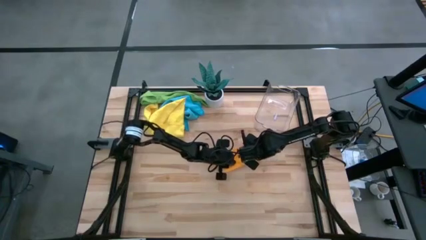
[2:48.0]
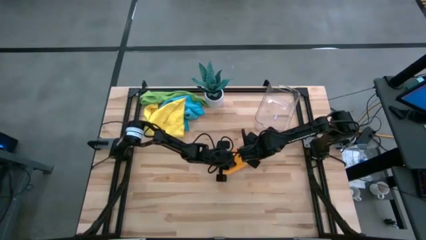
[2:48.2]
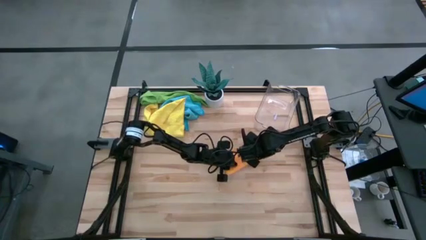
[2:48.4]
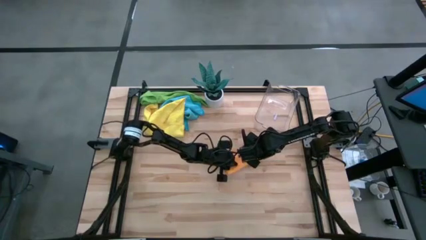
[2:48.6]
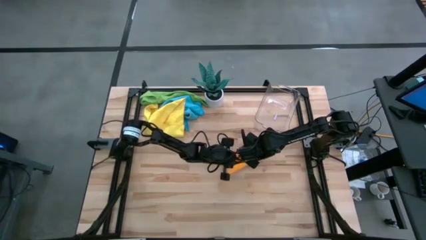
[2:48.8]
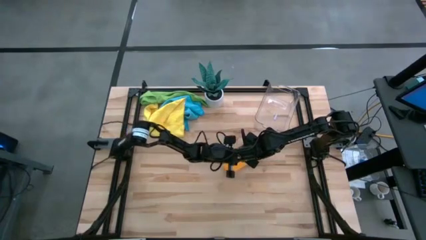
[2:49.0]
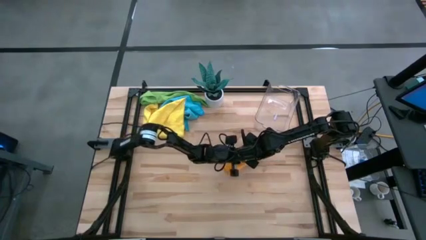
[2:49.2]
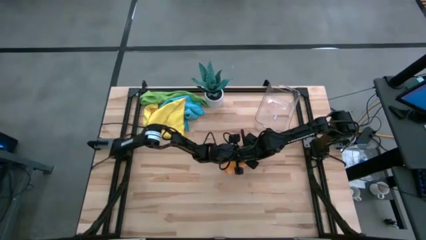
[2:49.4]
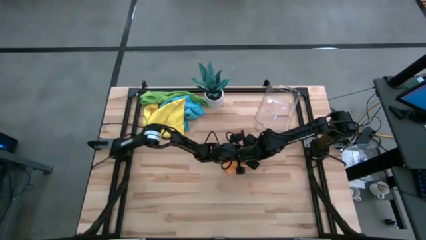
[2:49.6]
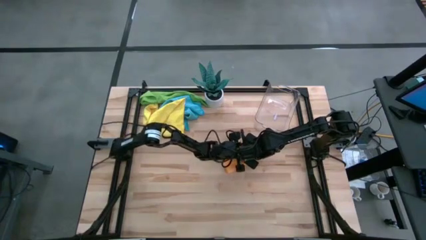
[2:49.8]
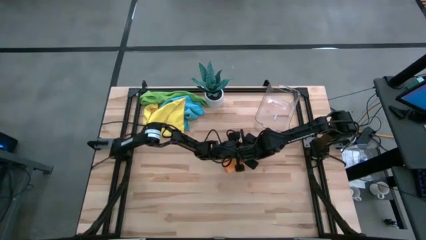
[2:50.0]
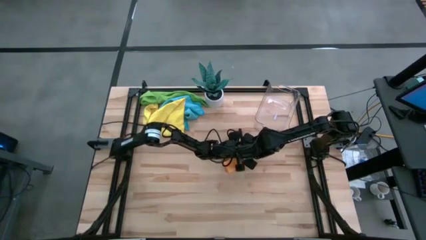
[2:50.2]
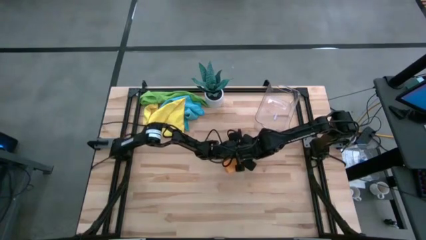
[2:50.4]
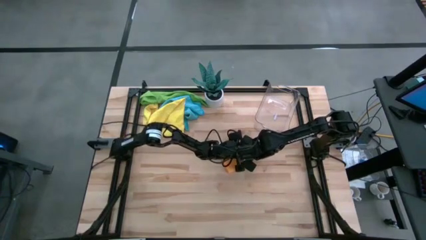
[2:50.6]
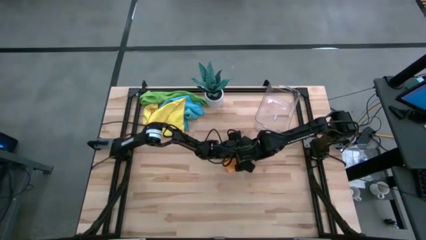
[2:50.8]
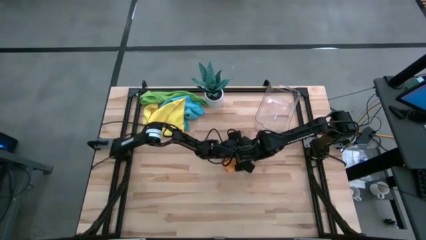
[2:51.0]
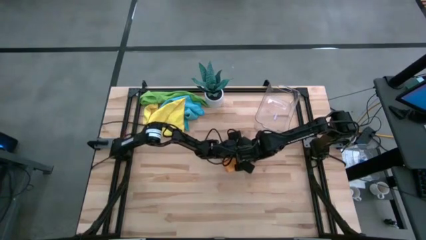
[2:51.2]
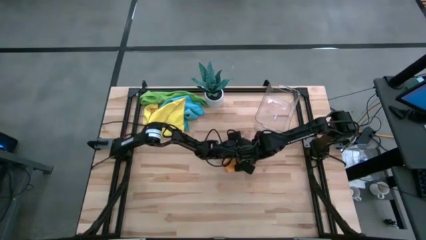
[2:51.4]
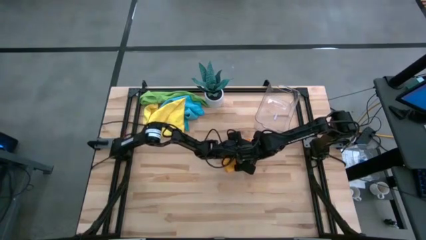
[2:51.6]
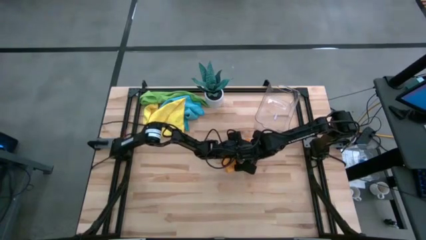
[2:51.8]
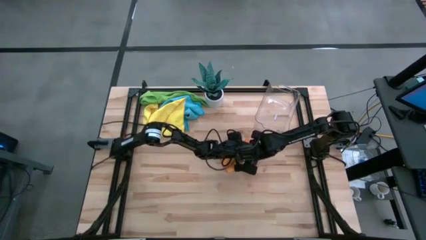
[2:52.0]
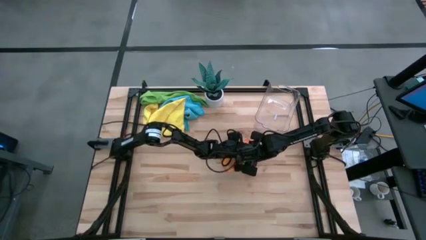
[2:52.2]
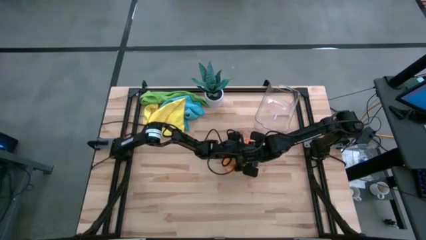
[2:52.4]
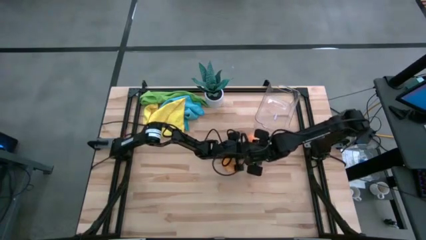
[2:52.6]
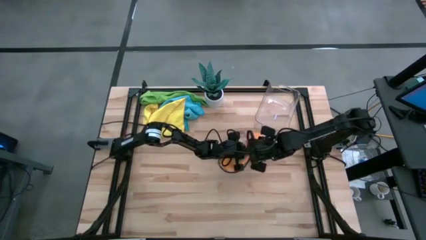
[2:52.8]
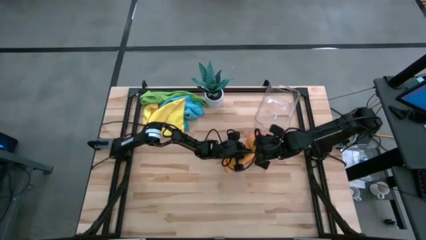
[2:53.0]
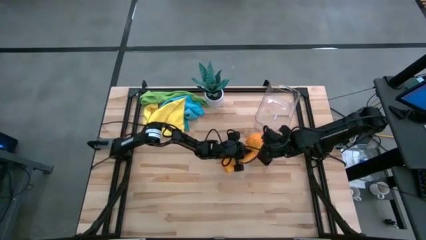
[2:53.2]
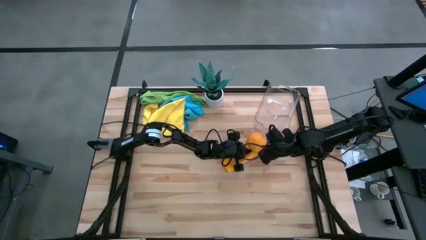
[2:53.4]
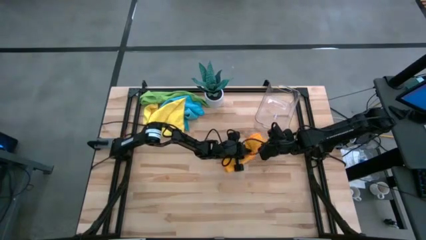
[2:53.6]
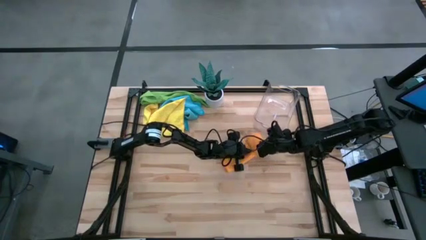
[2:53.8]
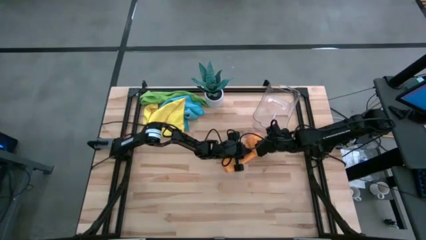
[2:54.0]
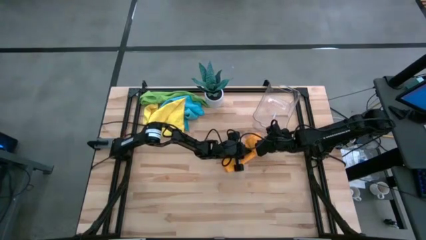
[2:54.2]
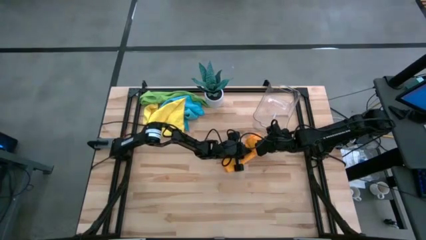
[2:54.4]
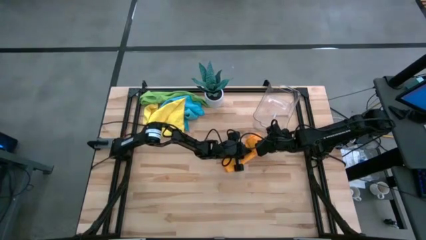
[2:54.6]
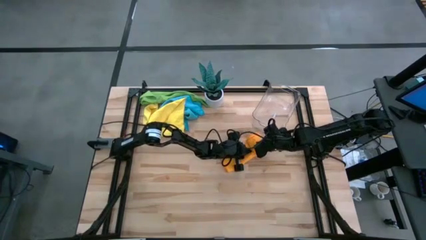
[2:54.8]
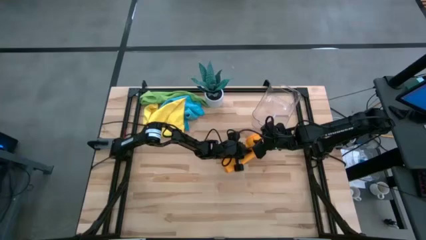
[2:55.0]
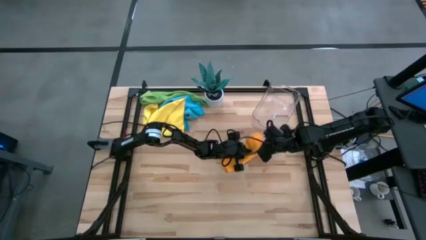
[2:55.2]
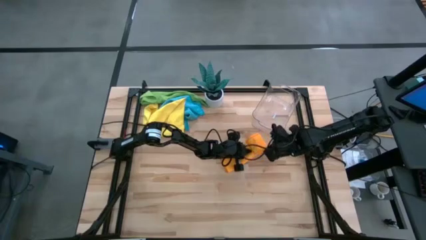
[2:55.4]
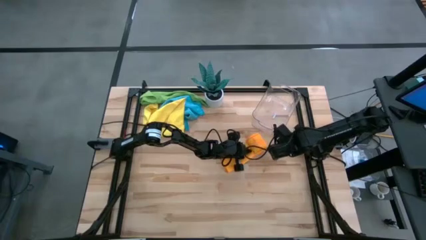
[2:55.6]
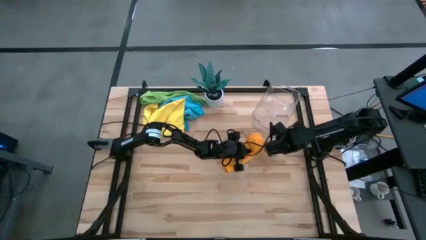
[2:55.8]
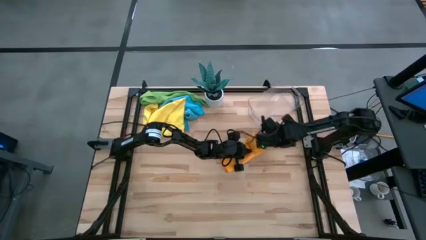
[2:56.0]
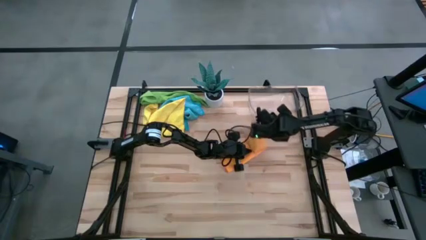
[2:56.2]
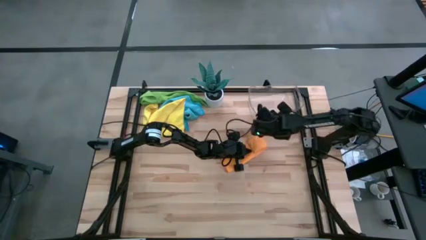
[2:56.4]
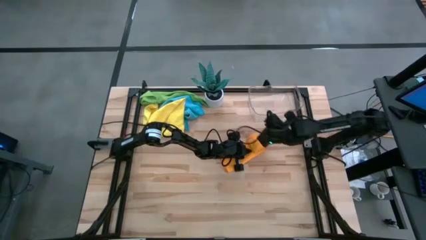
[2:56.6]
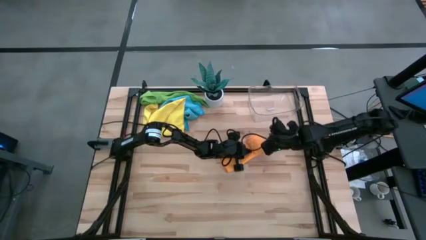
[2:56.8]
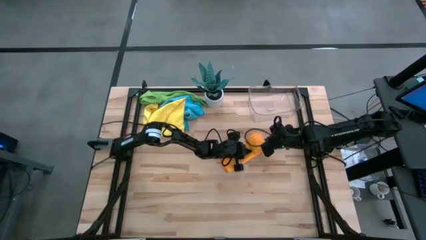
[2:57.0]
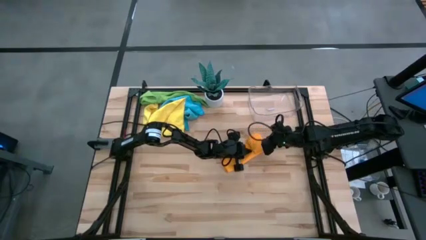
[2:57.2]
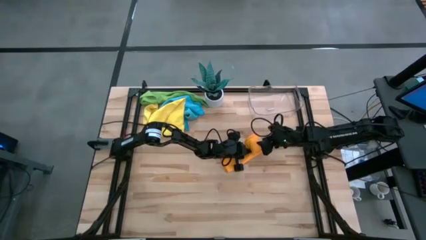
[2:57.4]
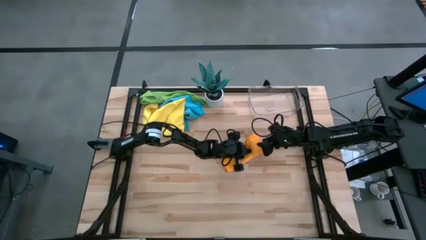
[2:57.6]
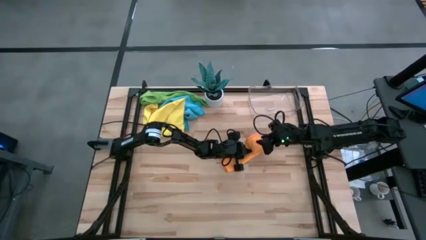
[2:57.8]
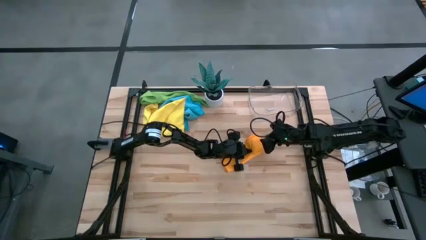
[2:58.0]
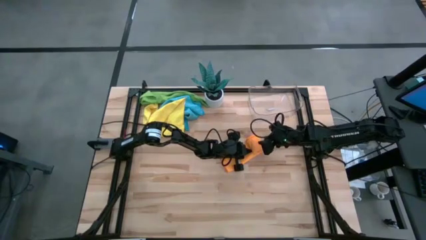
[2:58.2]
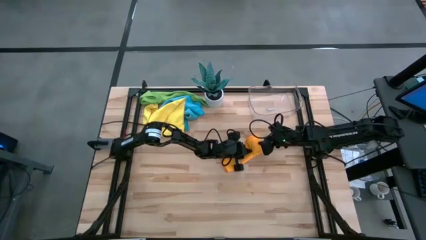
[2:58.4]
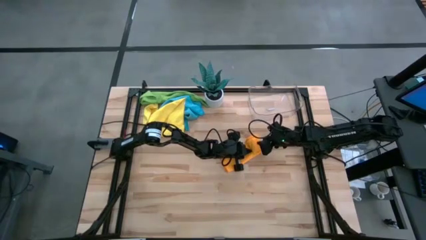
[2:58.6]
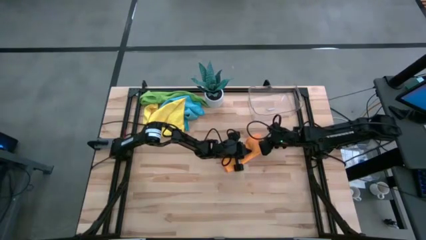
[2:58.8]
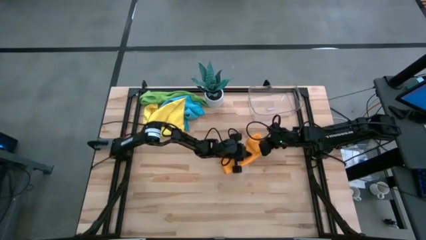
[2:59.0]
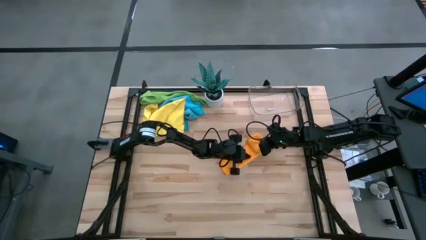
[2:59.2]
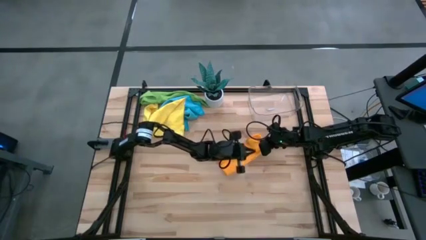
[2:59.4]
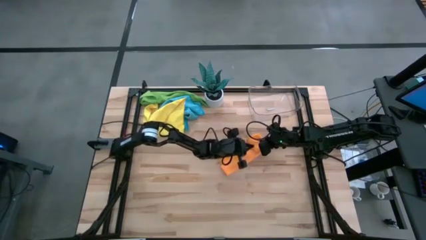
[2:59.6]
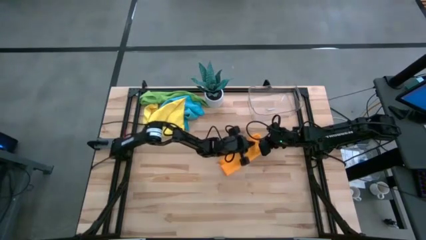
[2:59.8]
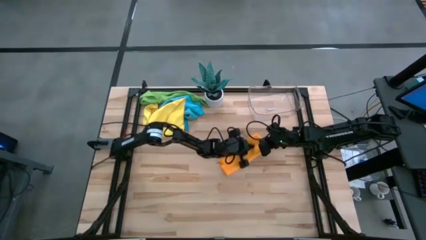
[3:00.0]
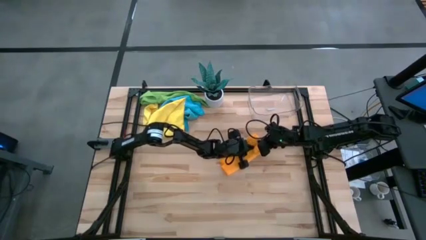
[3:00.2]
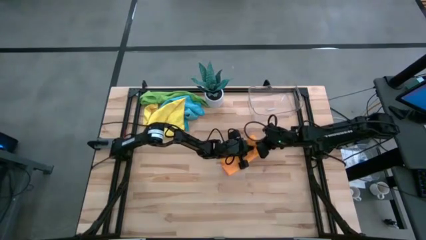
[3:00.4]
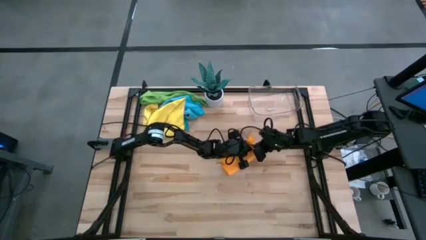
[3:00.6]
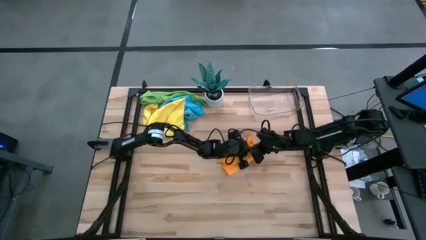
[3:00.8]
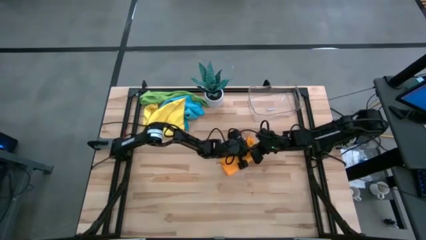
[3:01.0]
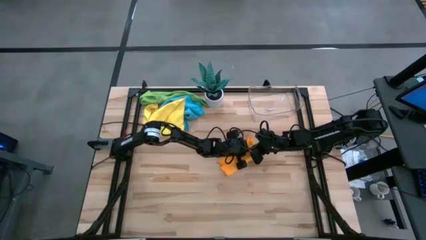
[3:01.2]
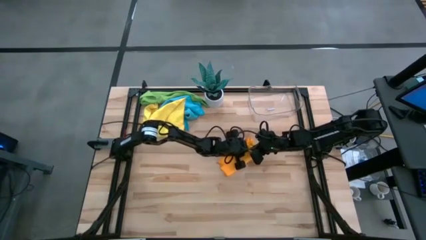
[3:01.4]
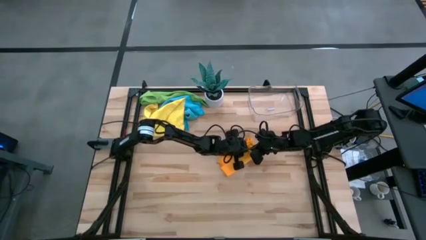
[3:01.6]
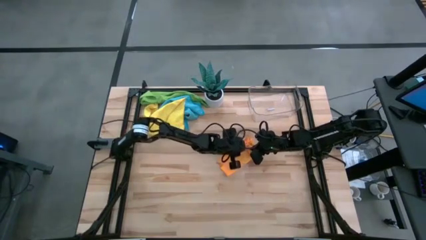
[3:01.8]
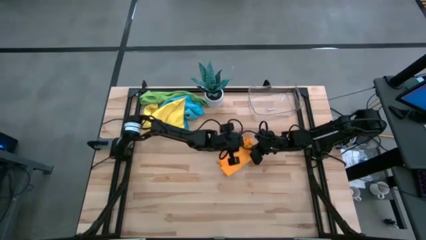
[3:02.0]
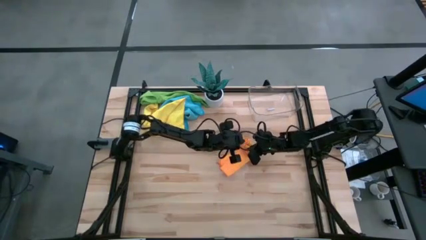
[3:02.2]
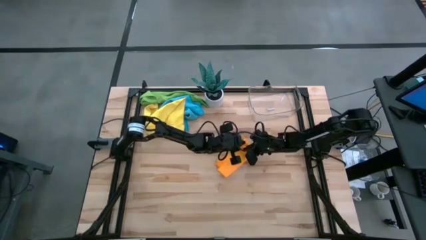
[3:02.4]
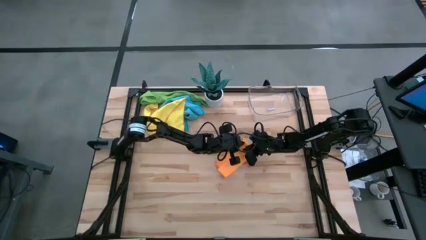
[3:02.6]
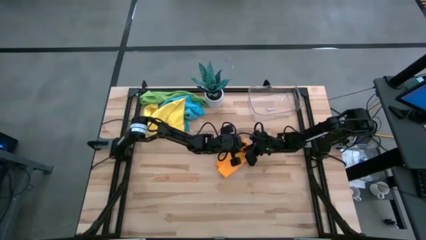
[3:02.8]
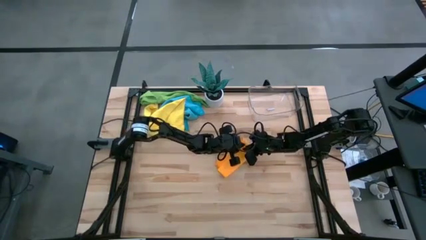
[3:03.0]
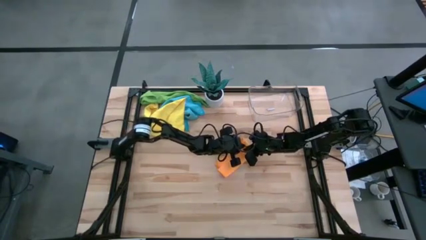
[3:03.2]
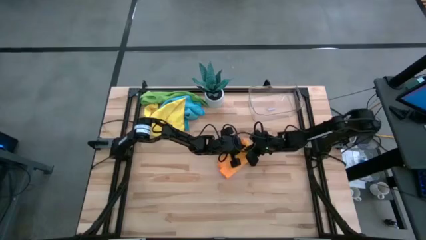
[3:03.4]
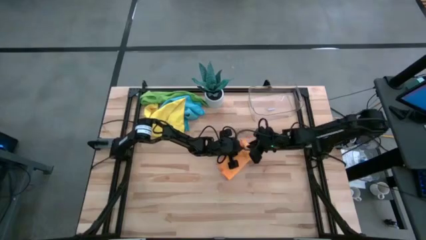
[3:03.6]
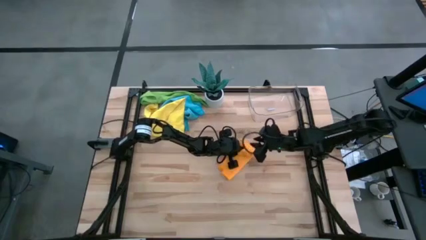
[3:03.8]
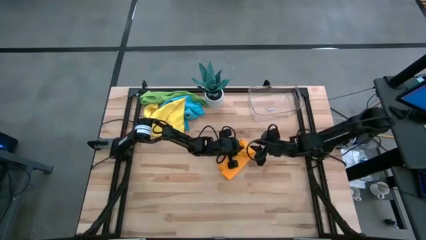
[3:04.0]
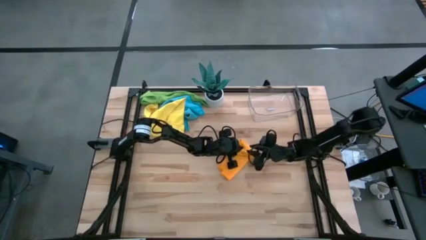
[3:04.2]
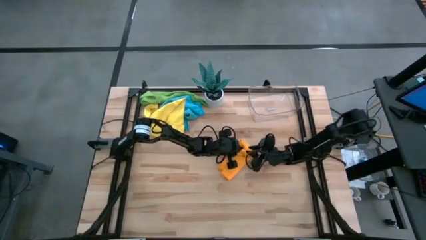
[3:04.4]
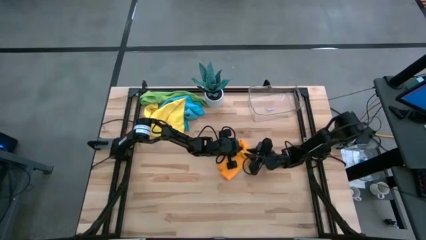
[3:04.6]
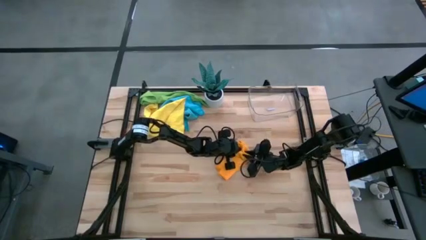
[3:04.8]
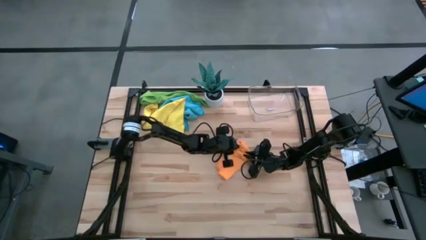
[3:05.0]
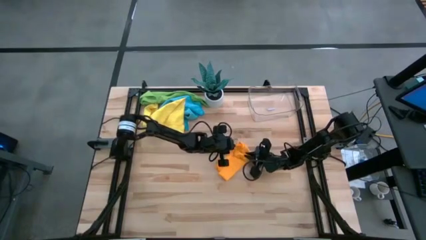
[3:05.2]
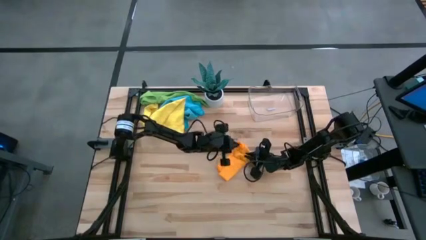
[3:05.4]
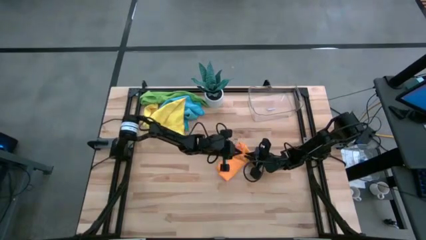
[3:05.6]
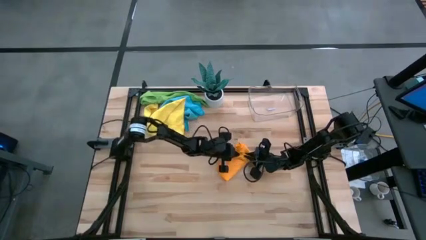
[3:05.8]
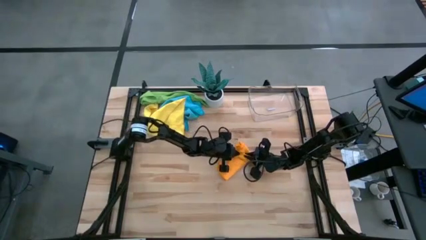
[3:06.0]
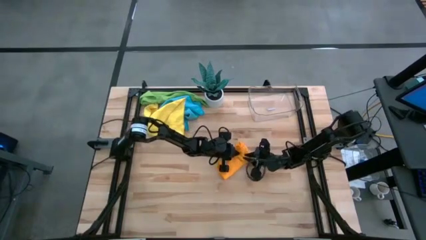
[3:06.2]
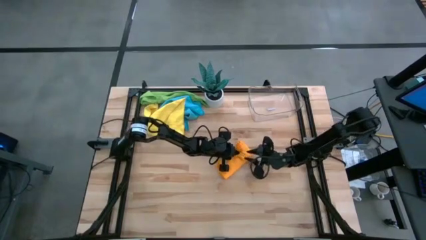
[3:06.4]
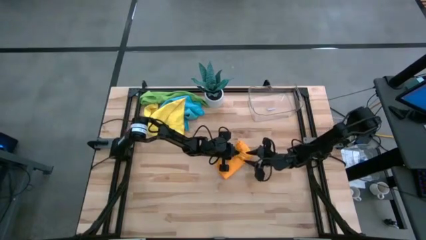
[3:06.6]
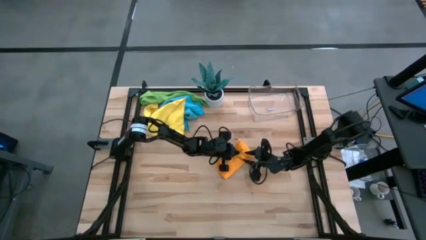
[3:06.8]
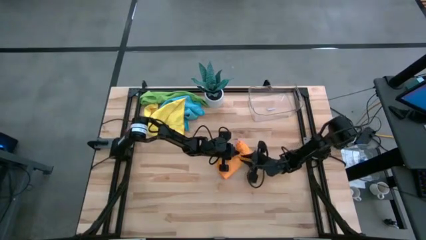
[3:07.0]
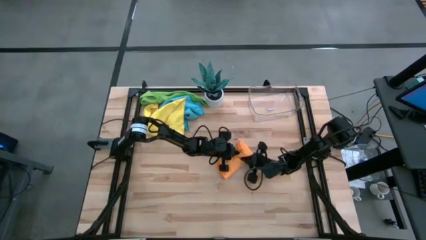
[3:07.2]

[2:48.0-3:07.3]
Task: Roll microfiber towels into tight, uniform cylinder then place into a basket
Roll the orange microfiber cloth
